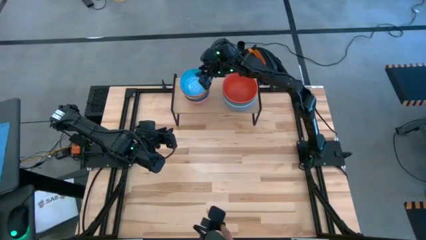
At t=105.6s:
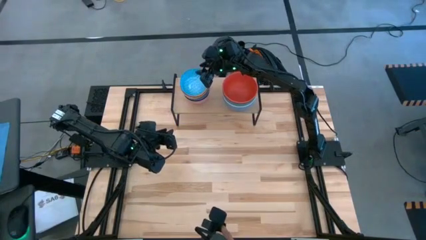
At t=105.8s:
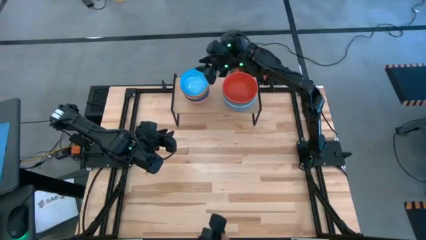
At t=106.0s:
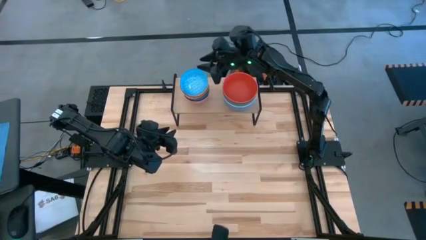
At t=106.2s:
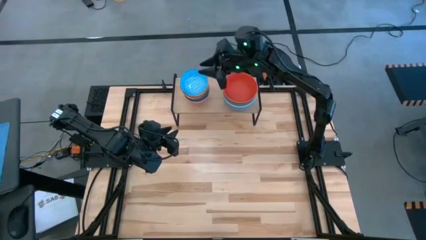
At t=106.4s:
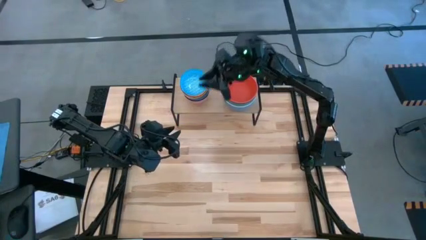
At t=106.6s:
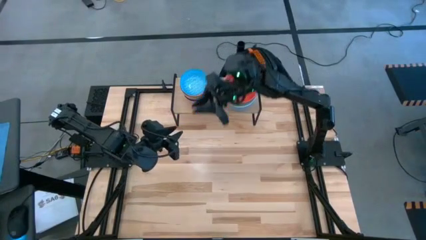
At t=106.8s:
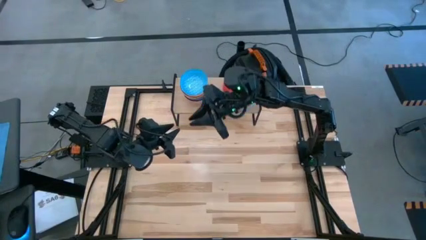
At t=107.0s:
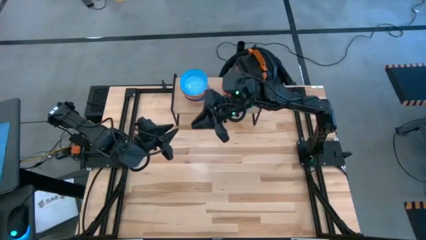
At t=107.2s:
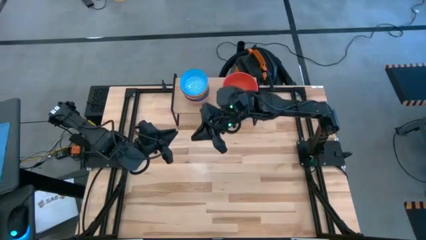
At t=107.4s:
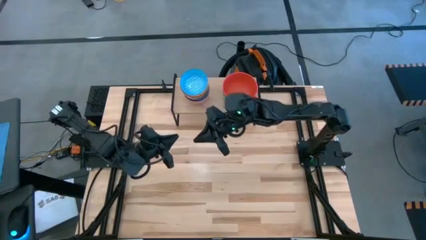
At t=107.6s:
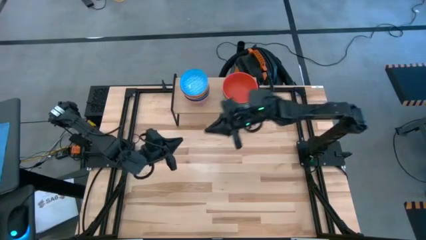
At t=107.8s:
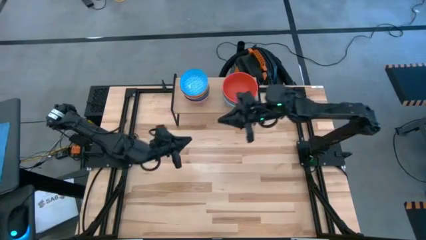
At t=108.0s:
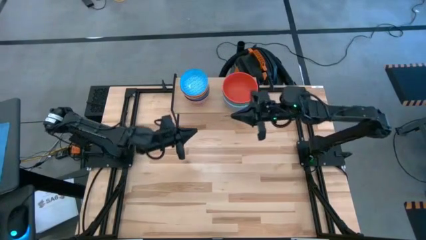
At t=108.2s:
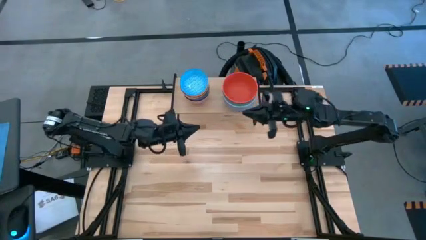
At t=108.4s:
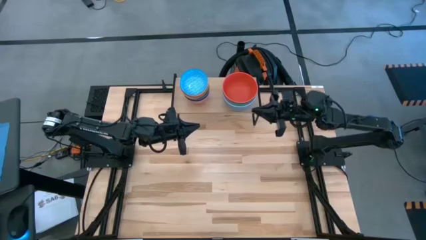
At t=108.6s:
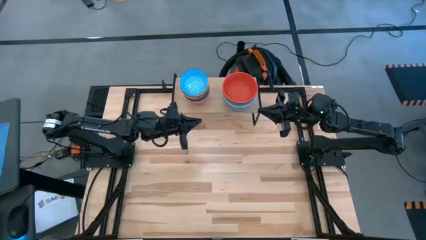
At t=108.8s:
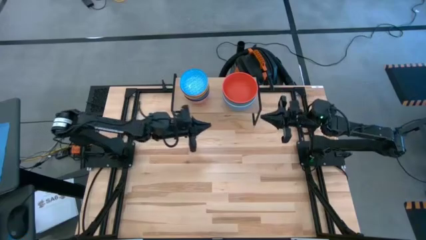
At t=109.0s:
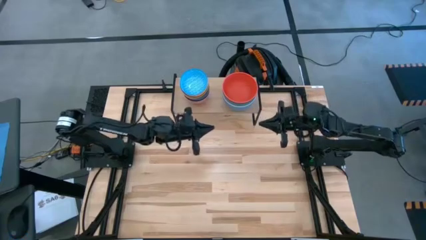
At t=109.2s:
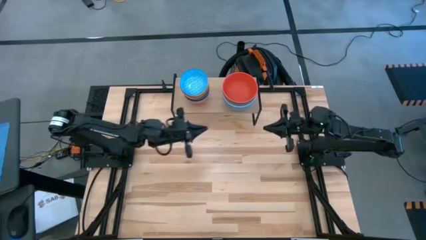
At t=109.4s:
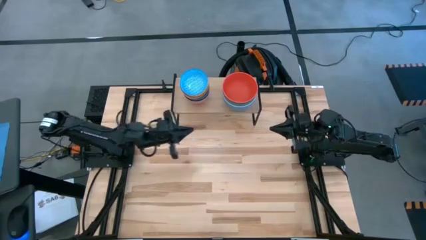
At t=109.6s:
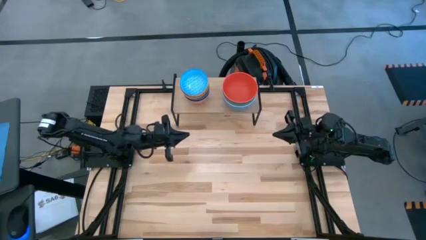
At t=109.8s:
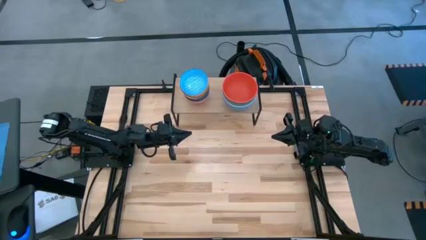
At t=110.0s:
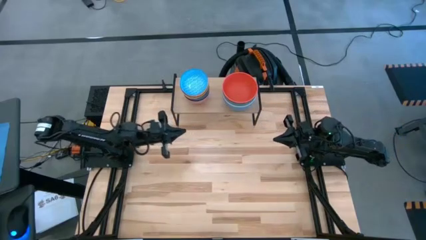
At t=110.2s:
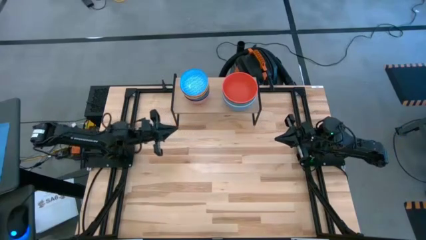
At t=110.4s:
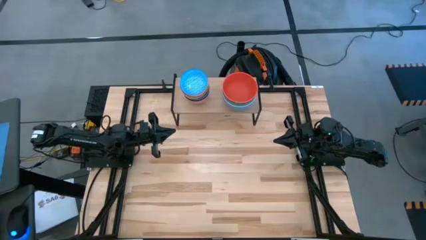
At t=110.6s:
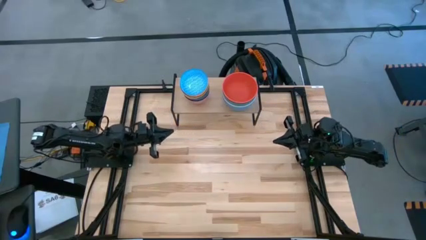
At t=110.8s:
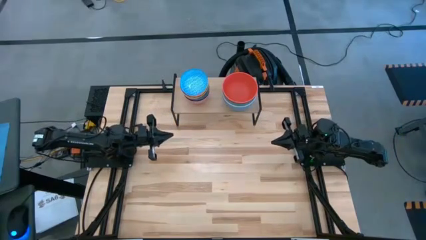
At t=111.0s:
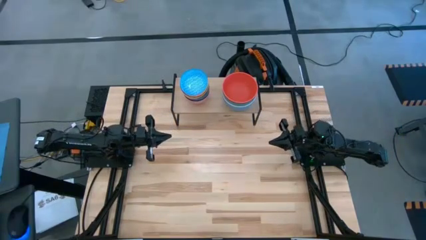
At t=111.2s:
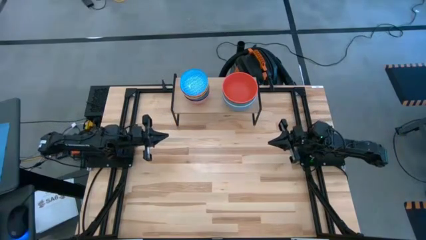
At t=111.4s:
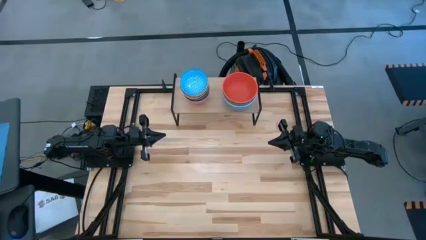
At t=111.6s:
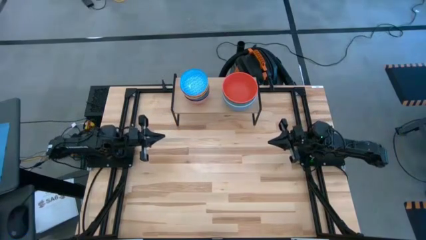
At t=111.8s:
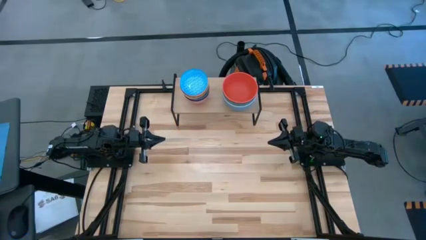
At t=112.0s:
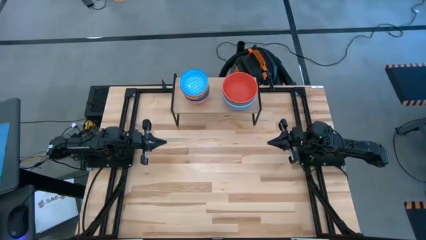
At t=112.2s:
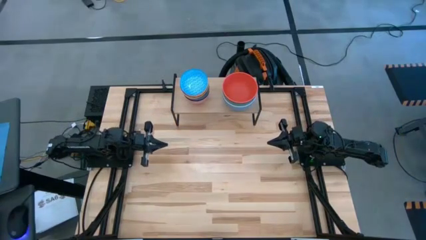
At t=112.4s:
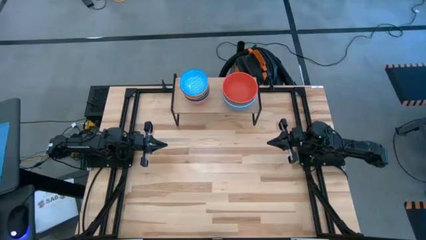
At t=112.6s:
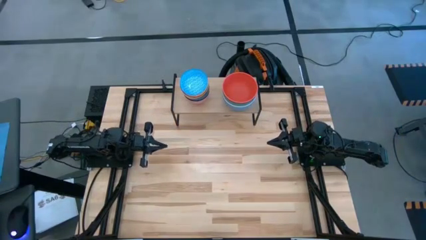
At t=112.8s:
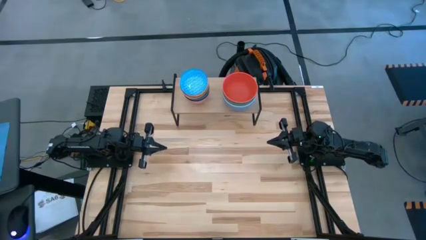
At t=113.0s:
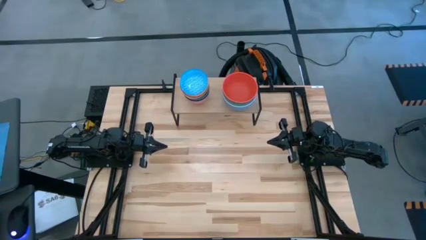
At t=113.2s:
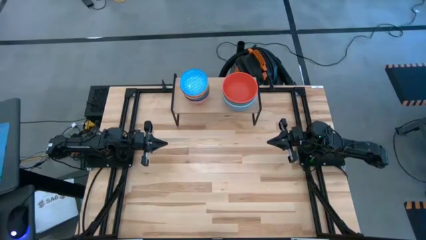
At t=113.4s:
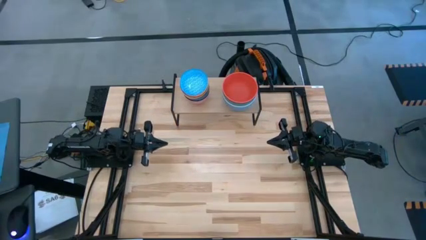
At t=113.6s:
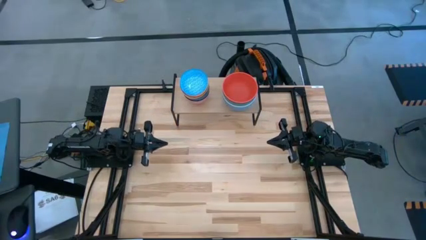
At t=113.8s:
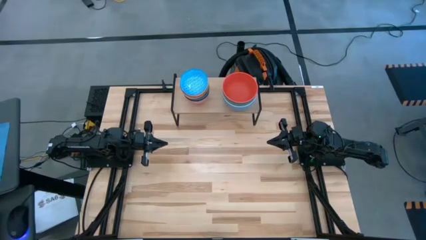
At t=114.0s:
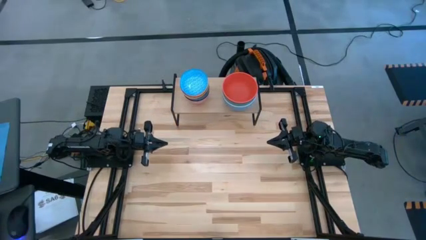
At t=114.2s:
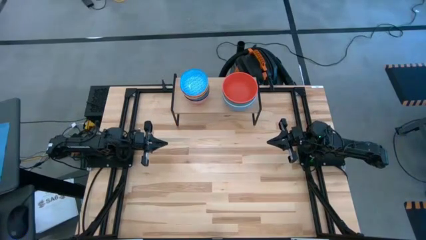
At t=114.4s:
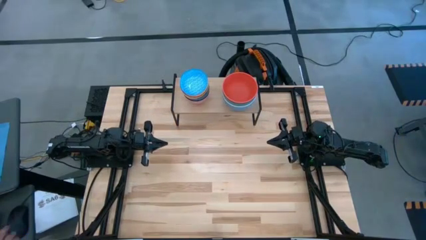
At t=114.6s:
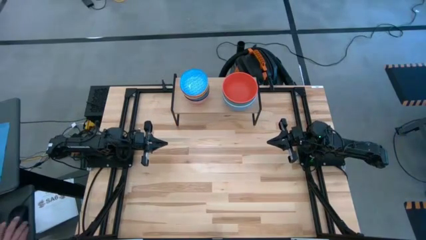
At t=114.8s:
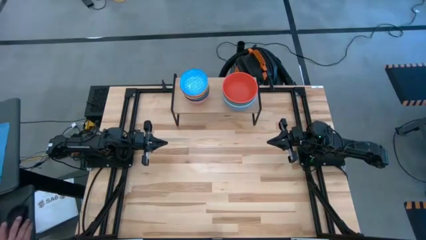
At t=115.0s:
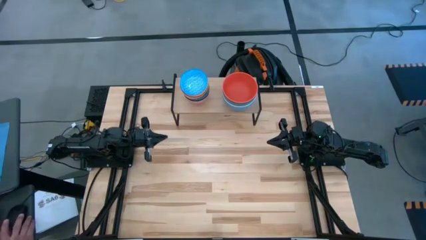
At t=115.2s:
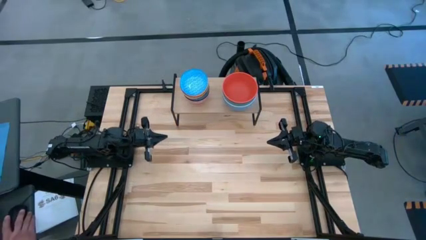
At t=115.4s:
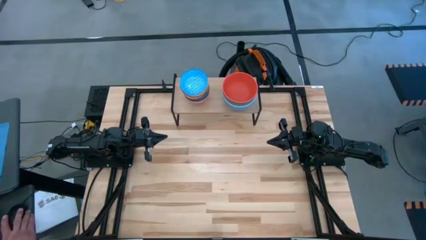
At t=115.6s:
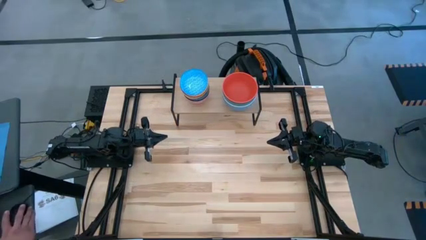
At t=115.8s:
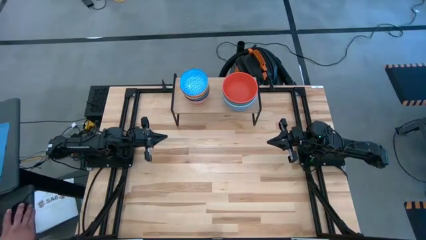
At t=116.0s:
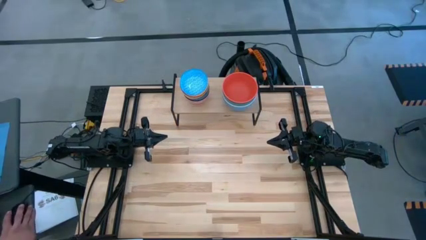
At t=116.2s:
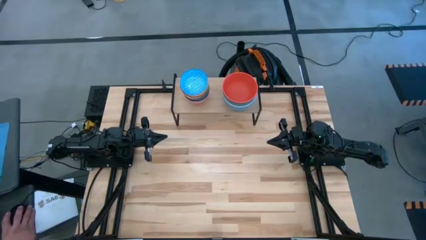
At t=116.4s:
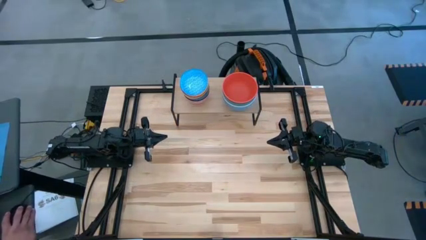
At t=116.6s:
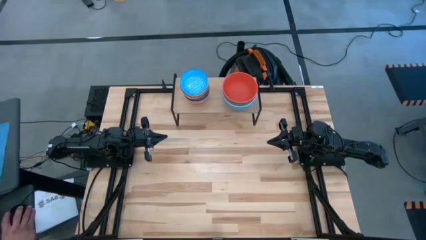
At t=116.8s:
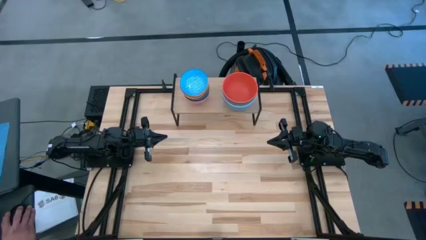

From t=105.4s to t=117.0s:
Task: Place and stack bowls onto a shelf
Return to Home Position
